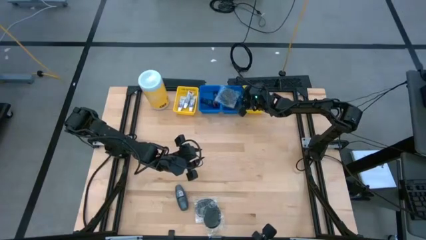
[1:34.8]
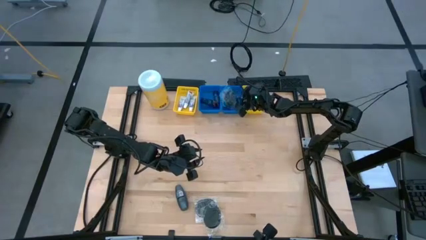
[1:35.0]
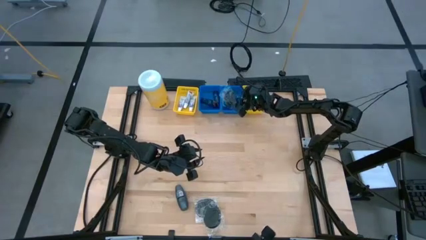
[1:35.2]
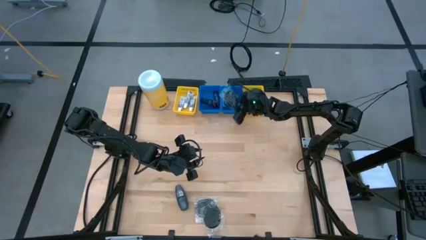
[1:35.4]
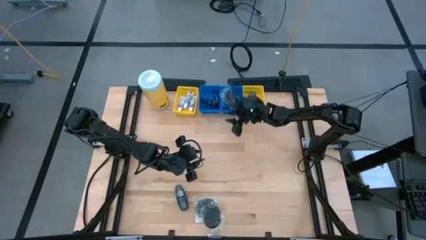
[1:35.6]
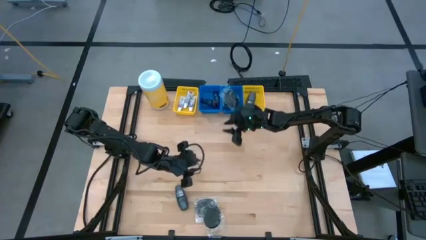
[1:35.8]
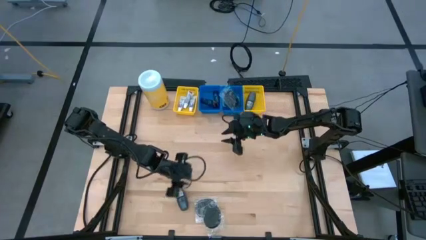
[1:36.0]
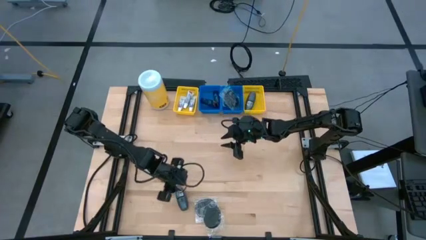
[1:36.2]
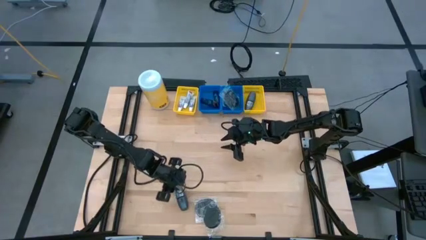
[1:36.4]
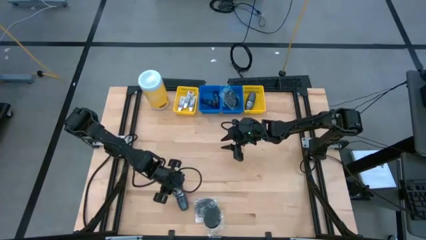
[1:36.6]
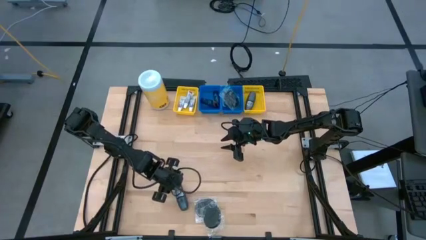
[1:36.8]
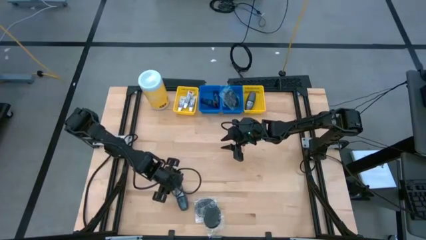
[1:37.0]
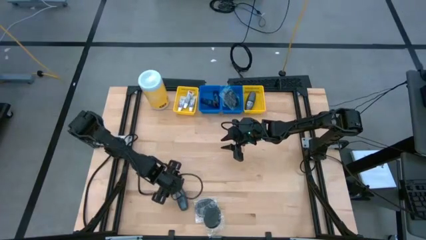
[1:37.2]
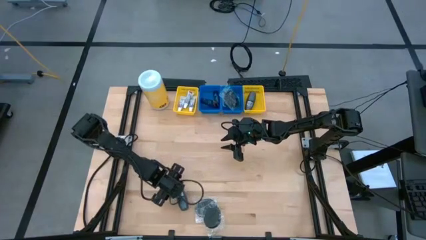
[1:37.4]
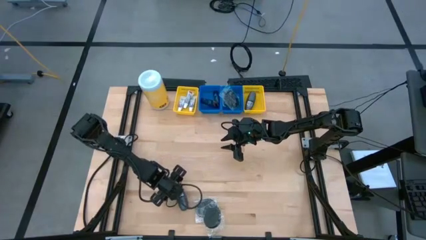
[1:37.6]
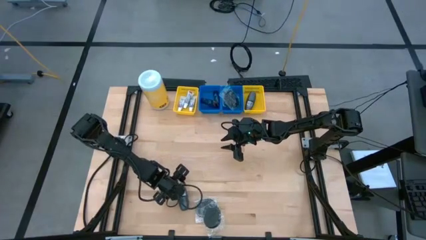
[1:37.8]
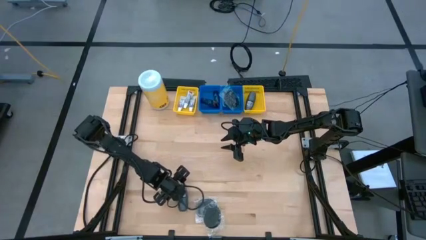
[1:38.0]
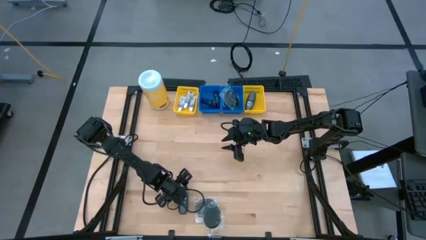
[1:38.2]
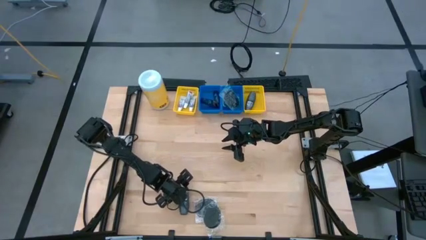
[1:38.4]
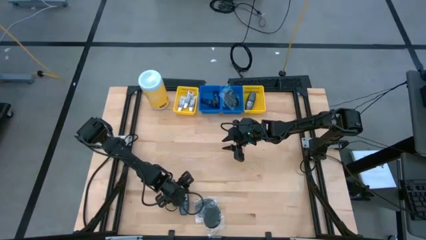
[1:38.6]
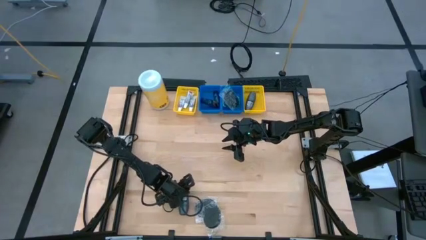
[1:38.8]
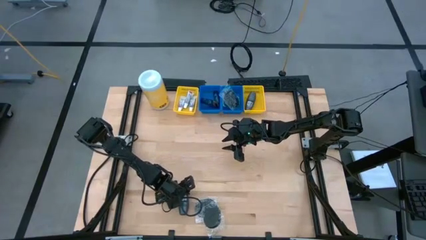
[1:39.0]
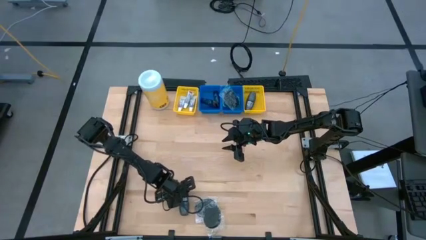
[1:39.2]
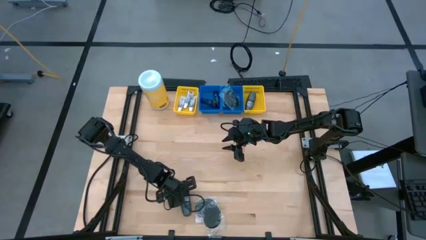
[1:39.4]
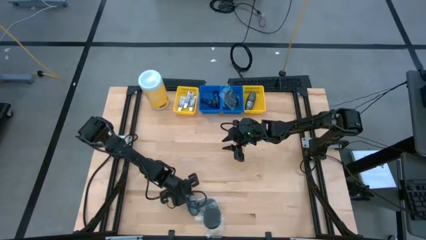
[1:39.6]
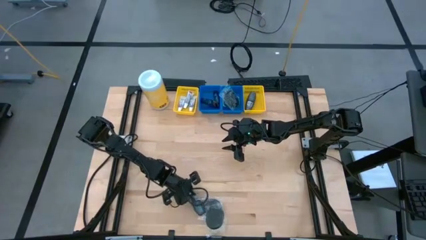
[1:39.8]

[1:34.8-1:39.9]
Task: Pick & Place Travel size toiletries
Put the deodorant into the right yellow bin

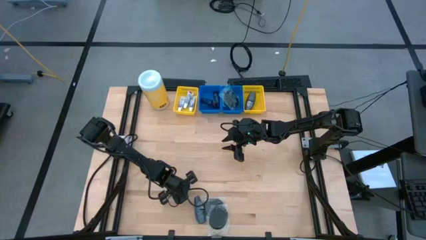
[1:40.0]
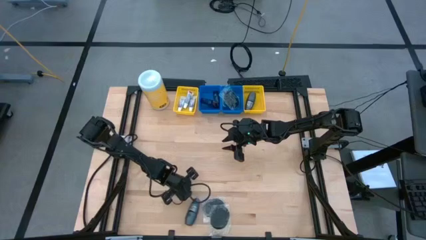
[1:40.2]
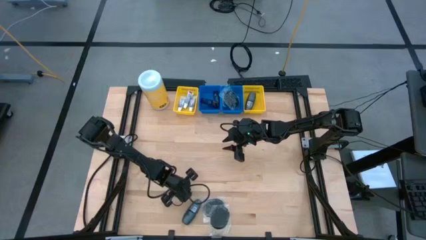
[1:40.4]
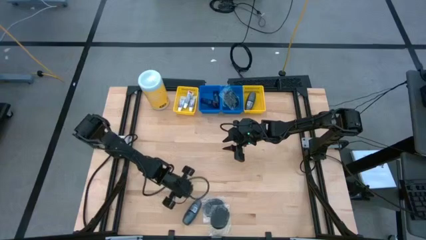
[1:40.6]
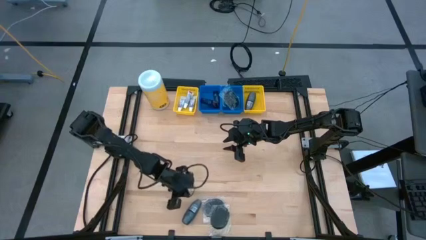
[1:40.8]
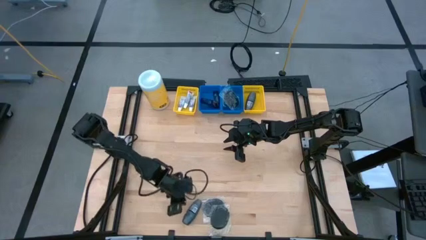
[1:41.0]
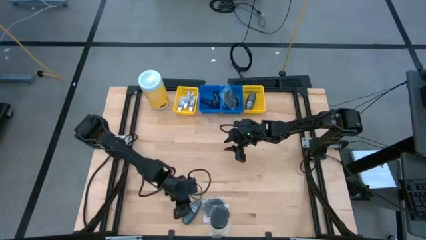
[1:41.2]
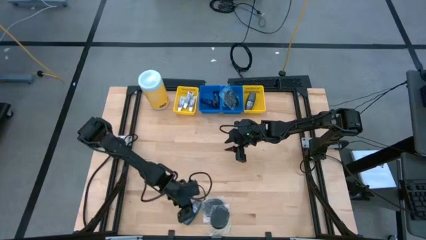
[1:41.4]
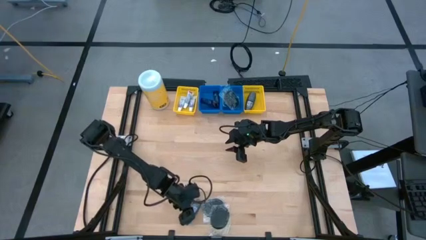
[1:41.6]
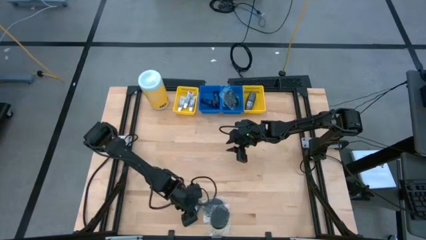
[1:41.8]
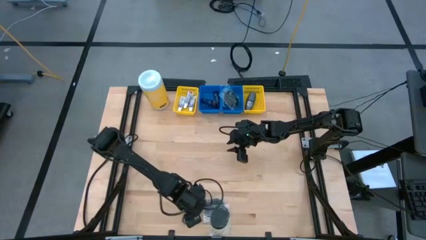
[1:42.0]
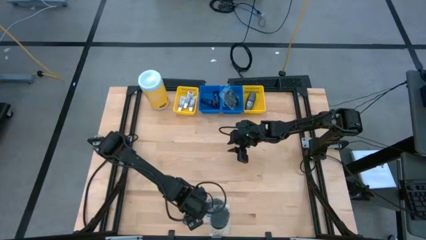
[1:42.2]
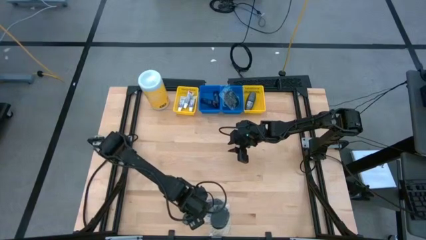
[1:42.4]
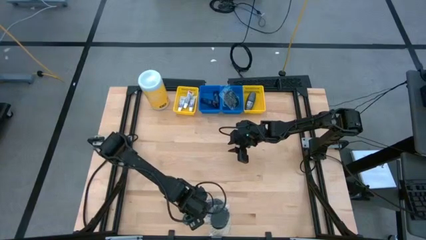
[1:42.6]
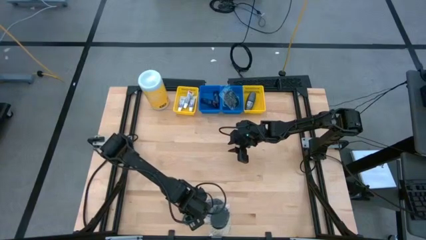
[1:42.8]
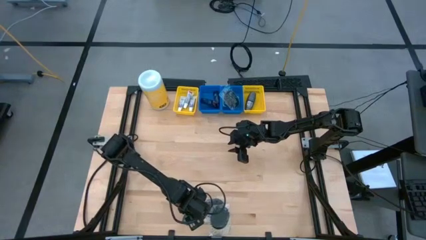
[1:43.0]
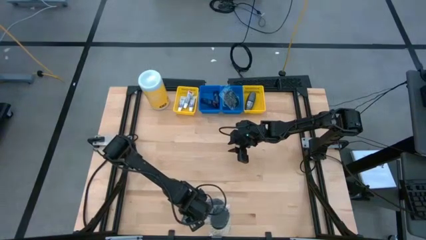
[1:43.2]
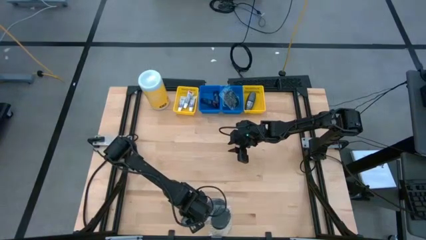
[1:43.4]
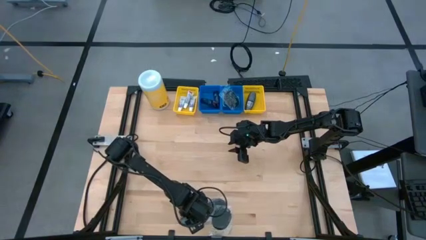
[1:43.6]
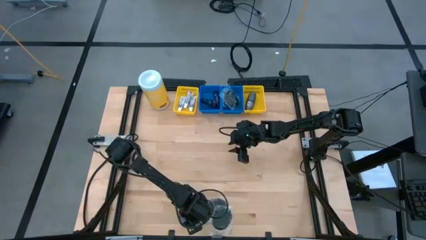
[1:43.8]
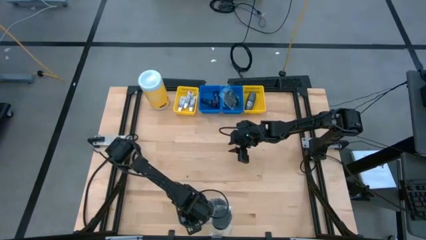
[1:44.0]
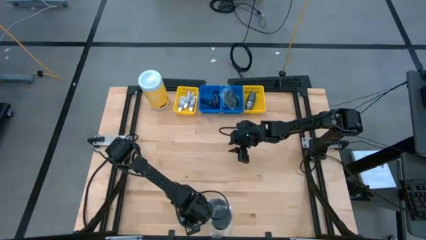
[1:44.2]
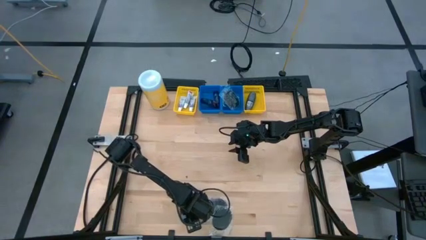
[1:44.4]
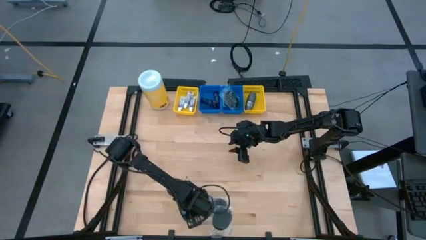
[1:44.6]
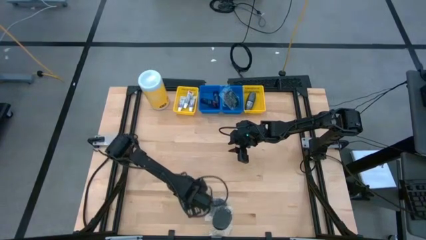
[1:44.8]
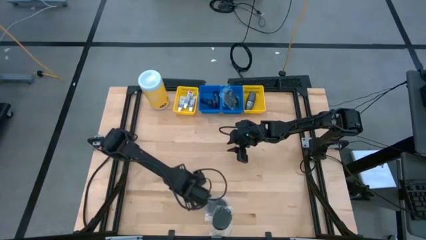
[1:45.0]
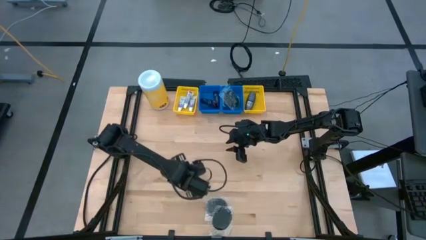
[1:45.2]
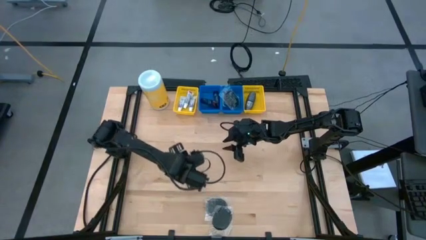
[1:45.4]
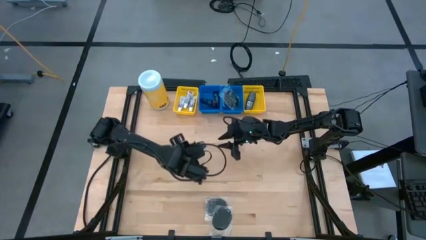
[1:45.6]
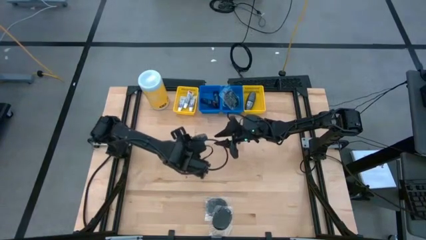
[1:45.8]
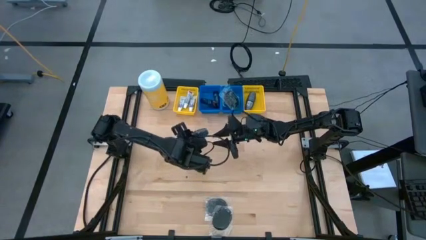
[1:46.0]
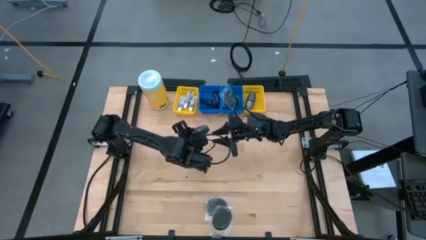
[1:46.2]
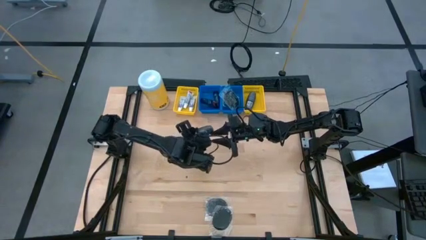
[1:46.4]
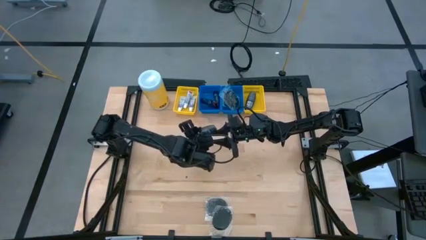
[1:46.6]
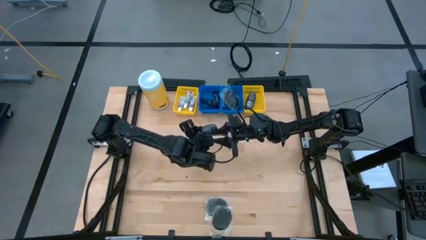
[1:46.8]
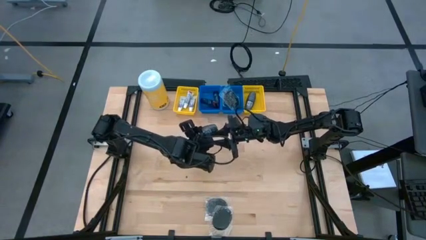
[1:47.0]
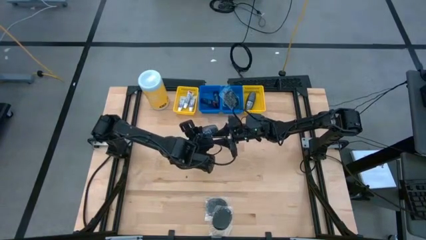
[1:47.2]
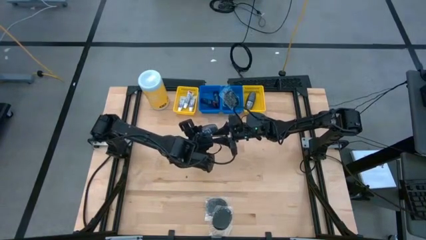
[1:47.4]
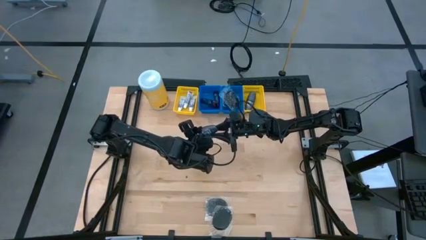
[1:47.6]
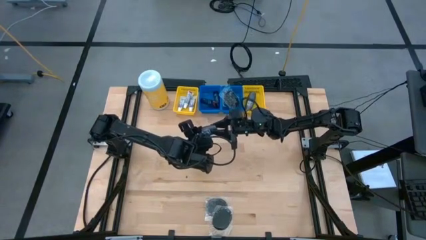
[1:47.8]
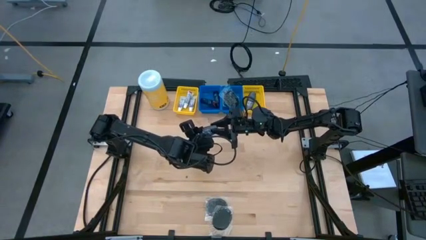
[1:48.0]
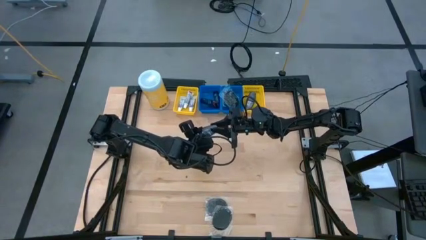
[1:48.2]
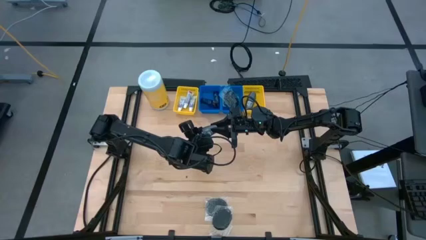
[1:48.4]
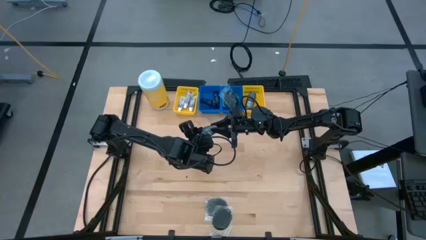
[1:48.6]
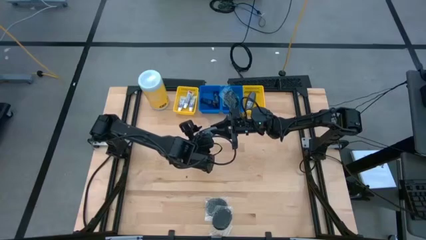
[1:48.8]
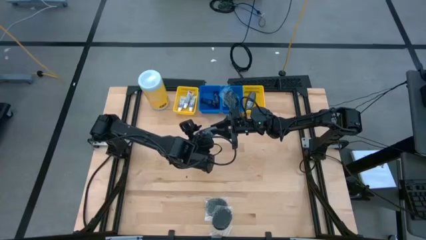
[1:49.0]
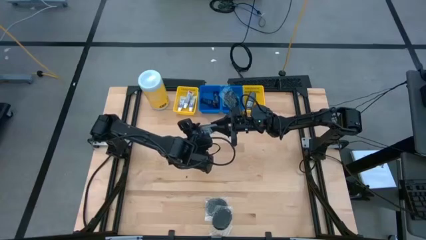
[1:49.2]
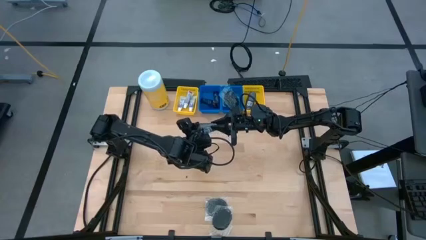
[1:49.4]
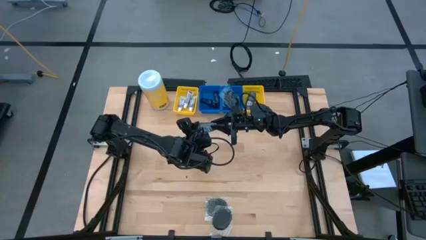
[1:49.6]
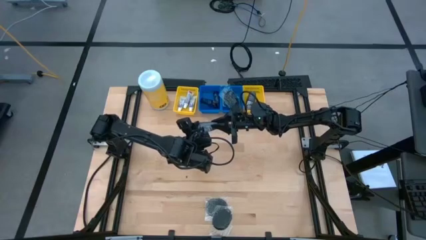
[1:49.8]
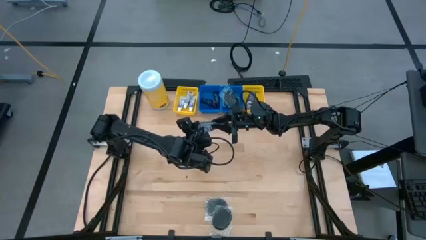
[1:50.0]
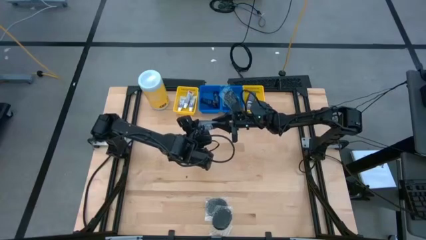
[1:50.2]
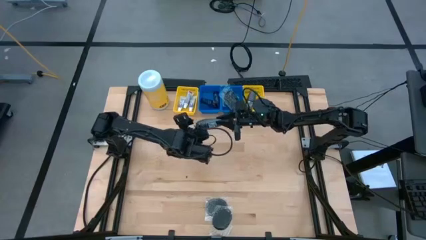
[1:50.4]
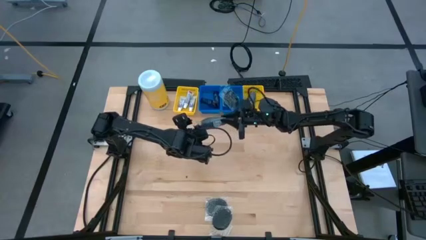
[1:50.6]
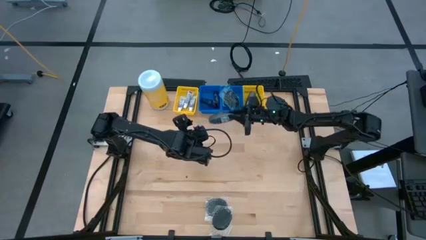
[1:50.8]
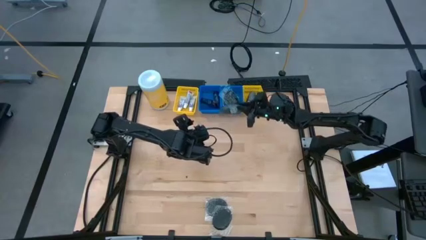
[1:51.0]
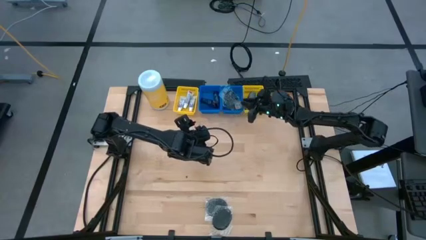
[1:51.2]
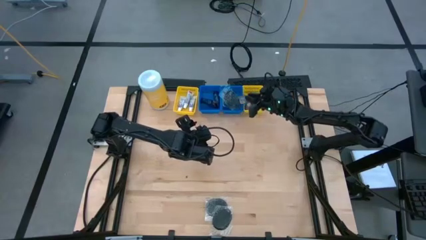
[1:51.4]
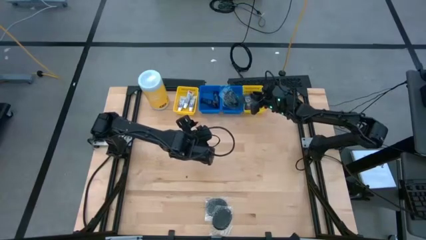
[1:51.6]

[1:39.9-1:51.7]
Put the deodorant into the right yellow bin
